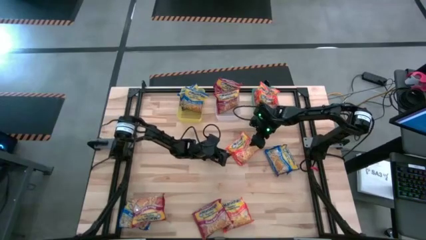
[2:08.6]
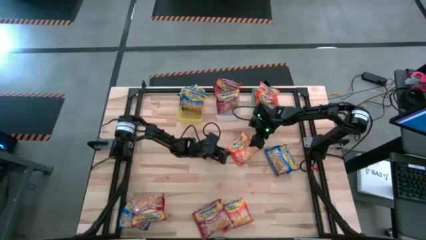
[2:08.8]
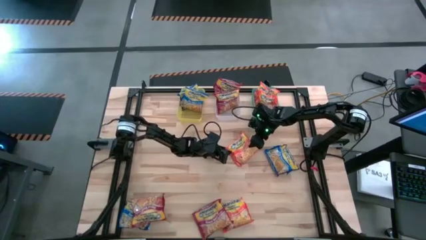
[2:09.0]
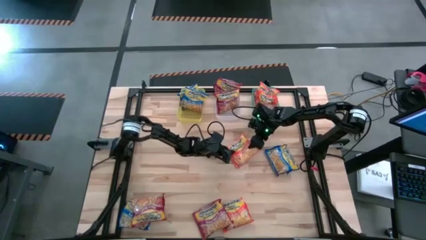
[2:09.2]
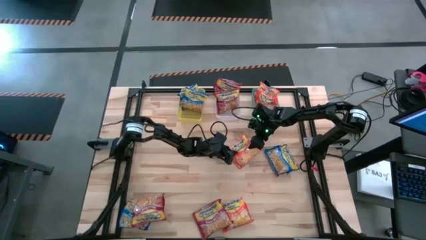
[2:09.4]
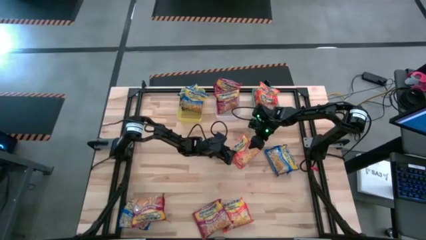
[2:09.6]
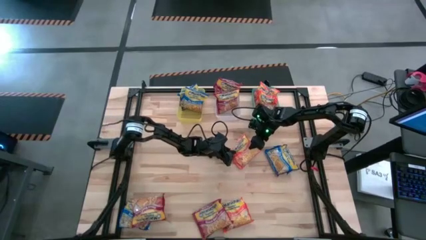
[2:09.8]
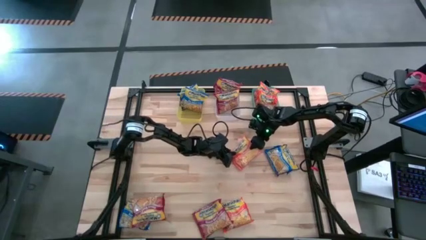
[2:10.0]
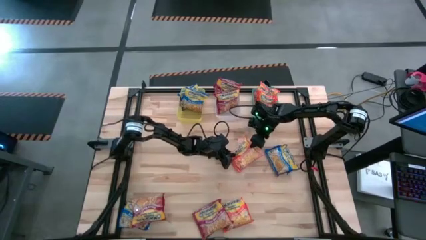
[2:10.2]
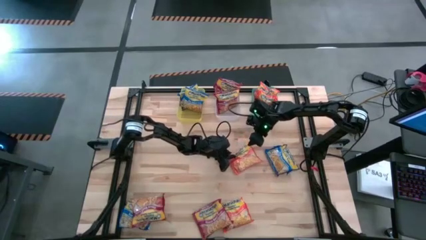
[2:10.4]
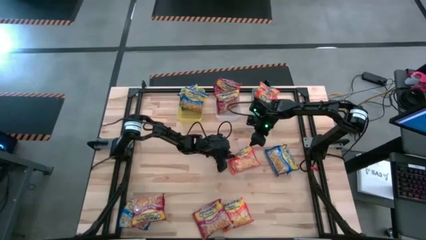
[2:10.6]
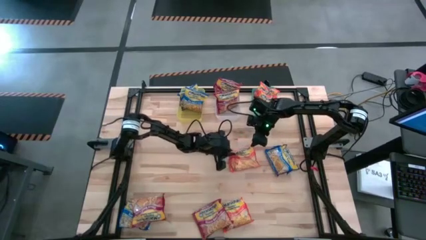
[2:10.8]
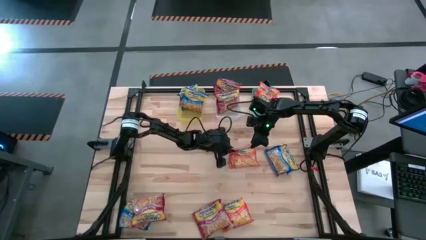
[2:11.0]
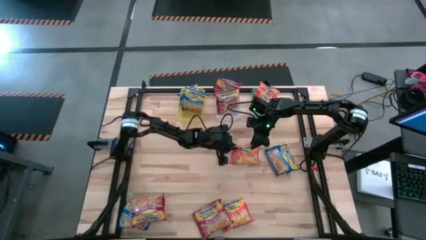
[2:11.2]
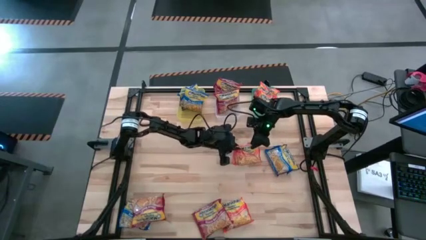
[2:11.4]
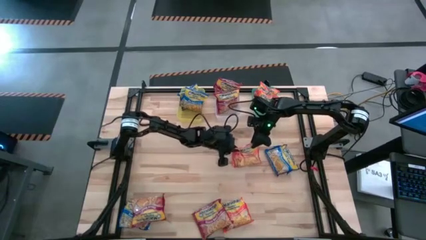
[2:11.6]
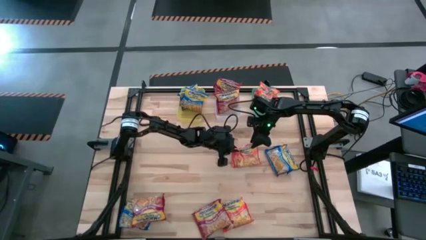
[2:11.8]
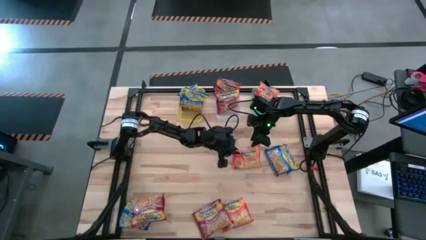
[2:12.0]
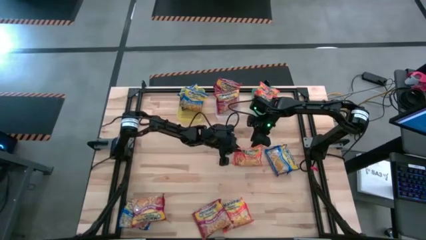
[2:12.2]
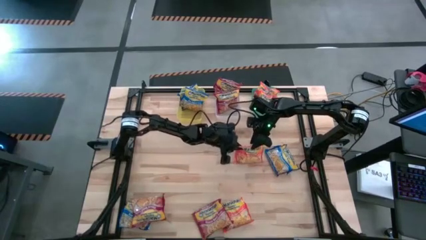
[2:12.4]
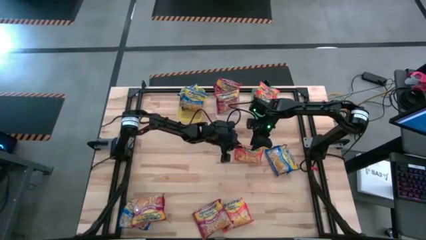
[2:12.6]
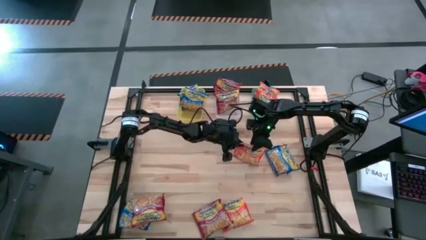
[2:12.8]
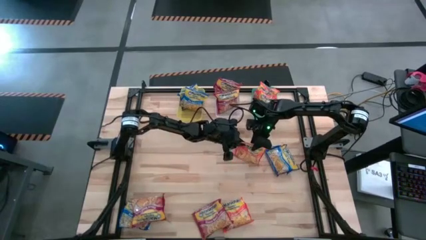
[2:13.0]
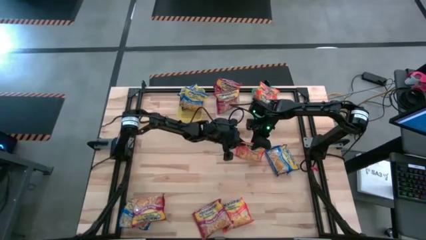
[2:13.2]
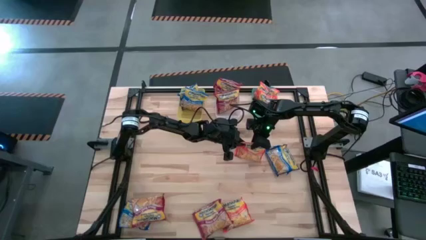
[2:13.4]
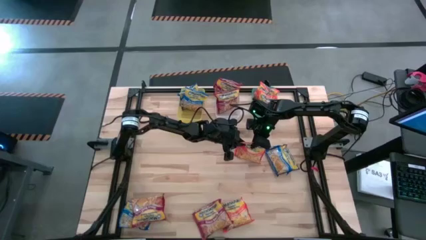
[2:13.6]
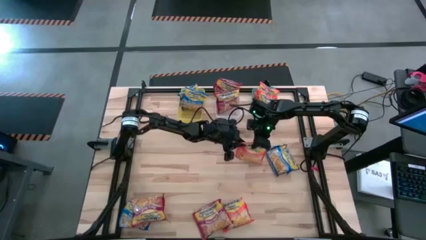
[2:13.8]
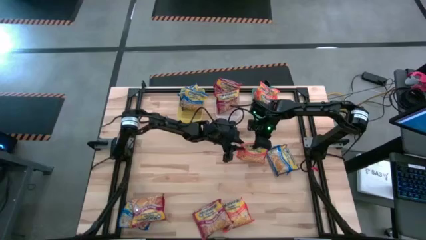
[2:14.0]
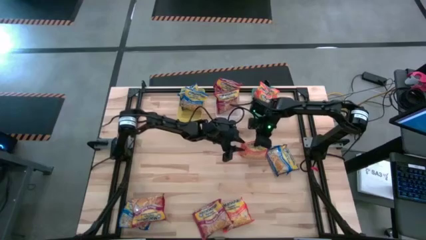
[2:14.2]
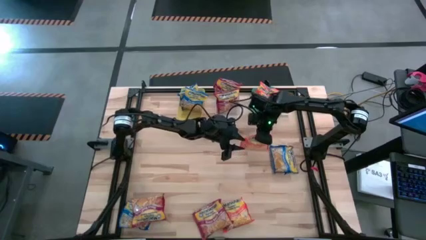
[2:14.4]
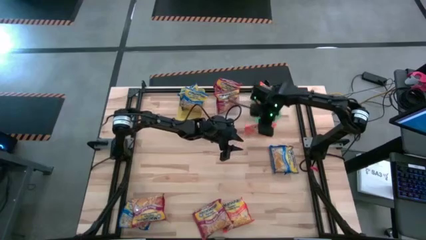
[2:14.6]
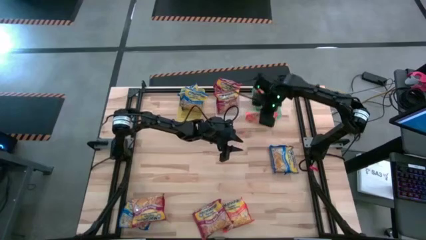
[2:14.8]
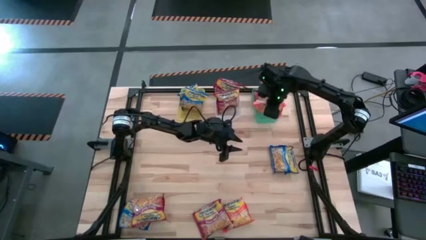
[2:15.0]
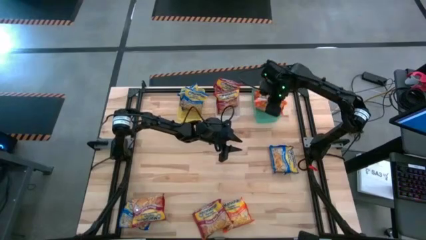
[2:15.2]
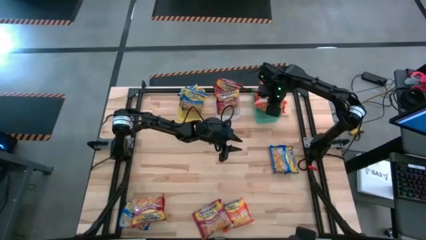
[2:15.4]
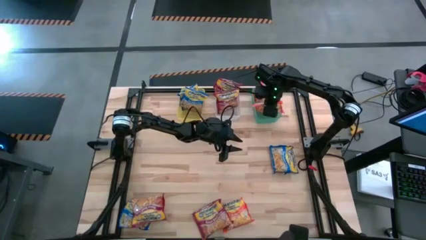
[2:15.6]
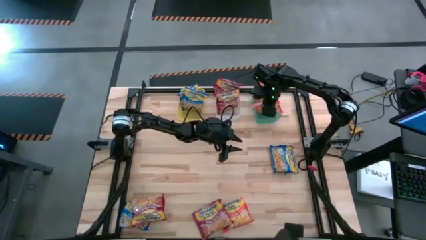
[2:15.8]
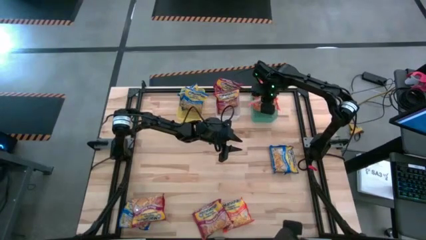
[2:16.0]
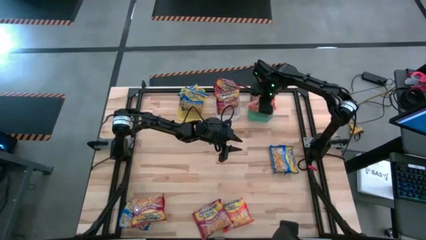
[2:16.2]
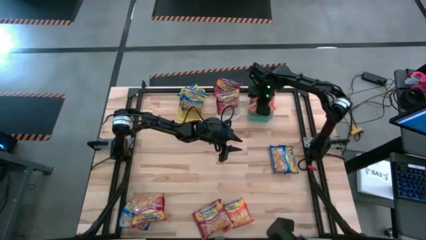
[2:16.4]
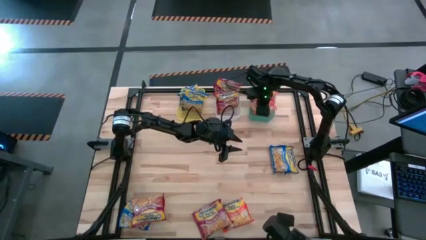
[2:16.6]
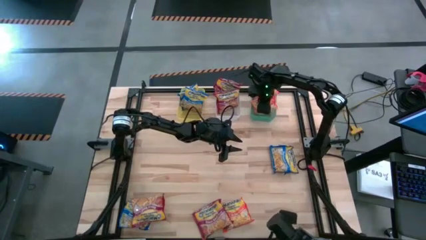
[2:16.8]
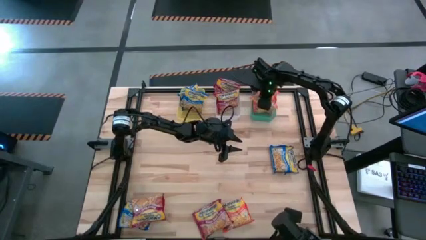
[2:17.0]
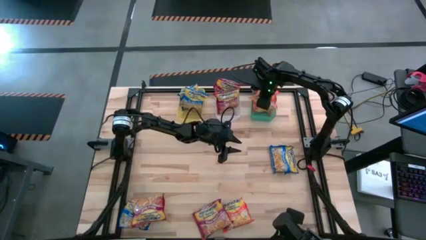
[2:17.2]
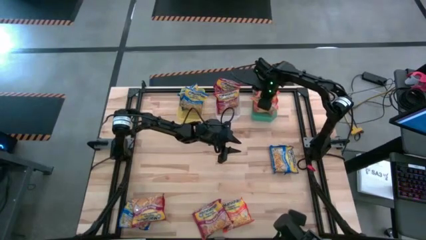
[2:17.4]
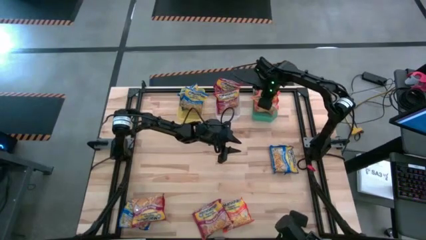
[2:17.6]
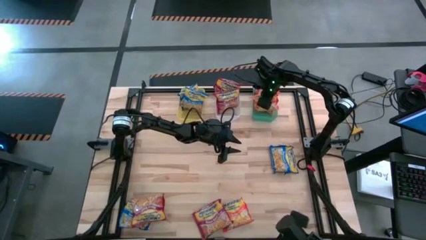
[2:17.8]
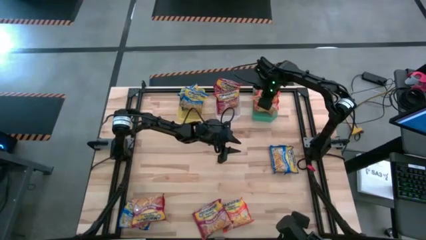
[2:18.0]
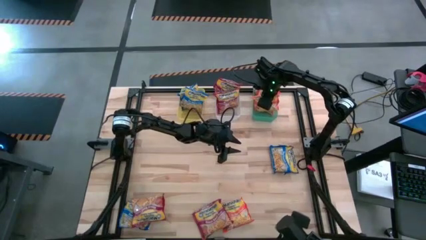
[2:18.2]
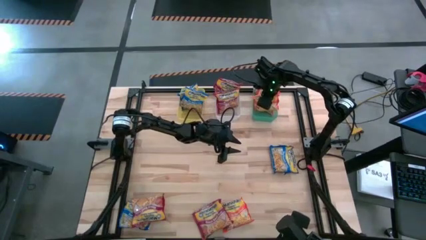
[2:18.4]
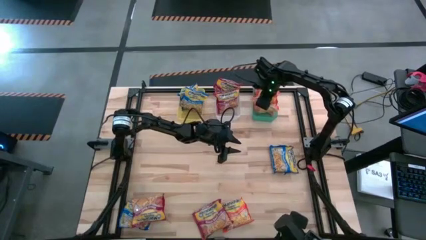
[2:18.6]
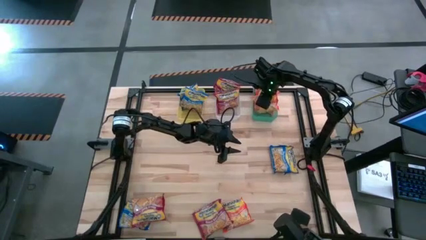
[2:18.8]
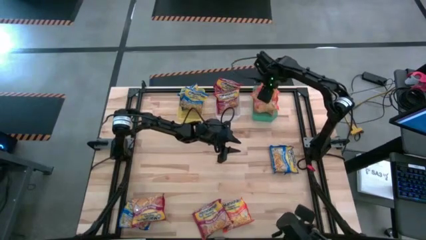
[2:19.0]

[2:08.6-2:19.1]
Task: Sort Maruchan noodles
Put the right orange noodle pack into the green bin

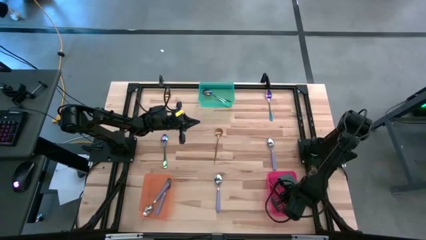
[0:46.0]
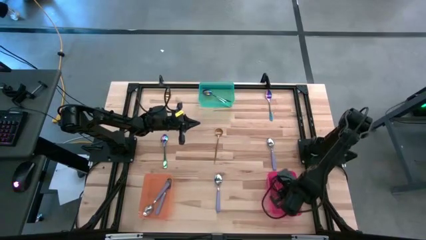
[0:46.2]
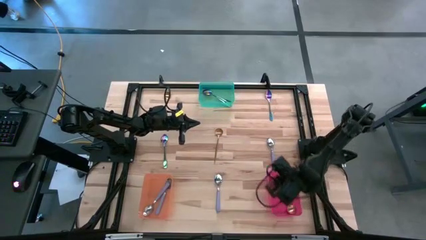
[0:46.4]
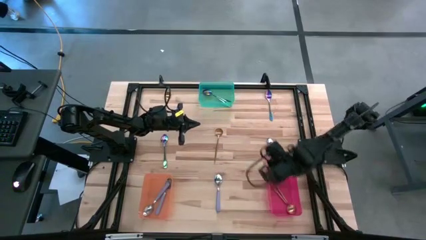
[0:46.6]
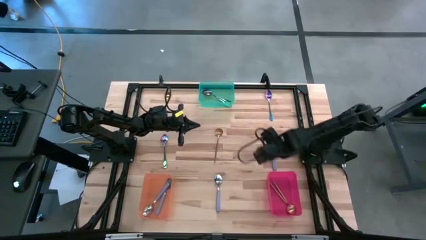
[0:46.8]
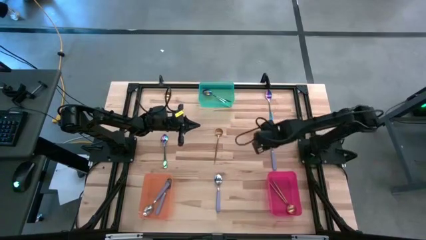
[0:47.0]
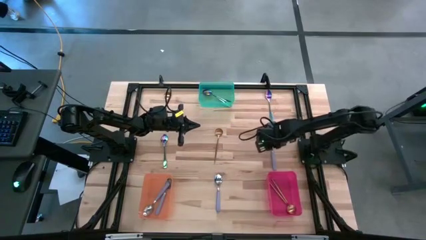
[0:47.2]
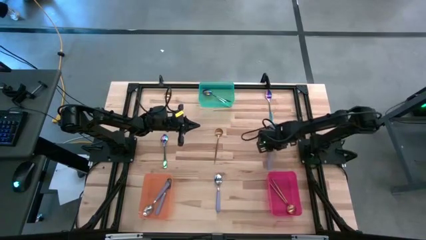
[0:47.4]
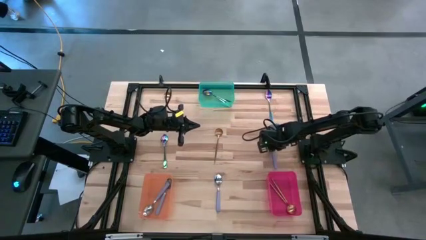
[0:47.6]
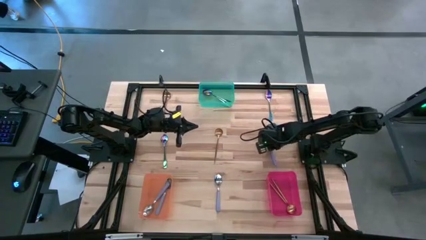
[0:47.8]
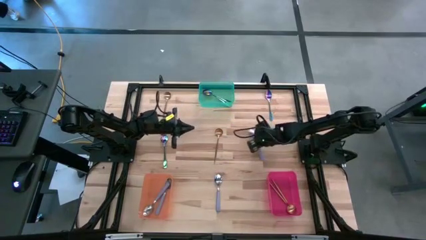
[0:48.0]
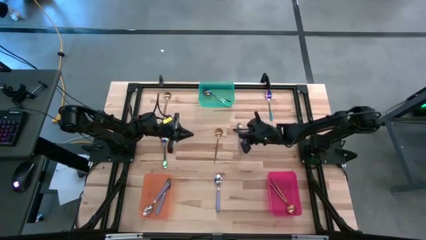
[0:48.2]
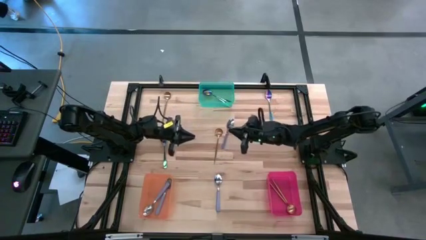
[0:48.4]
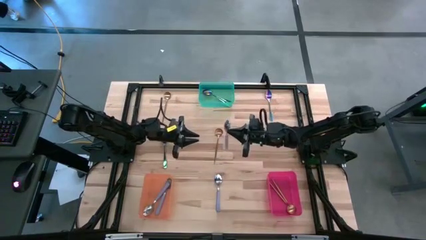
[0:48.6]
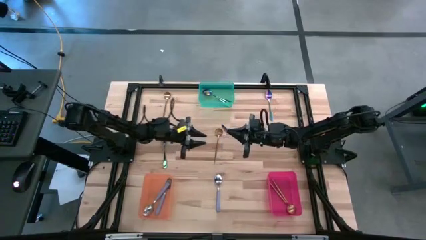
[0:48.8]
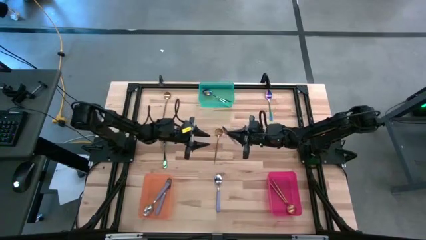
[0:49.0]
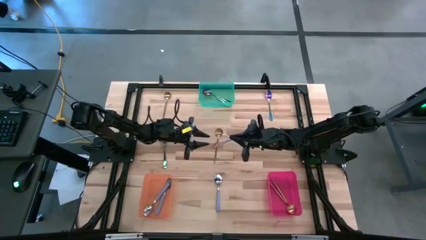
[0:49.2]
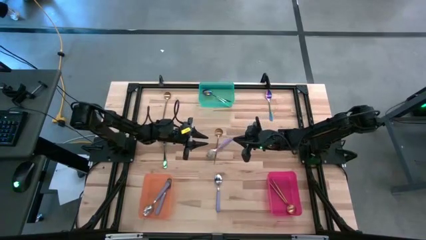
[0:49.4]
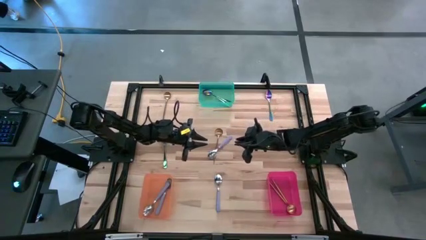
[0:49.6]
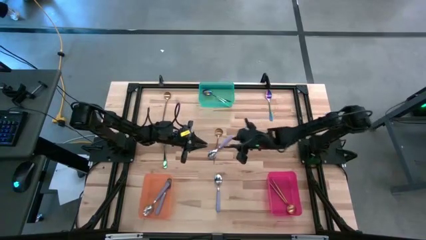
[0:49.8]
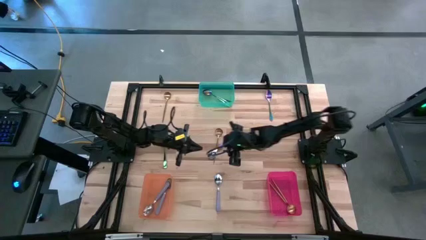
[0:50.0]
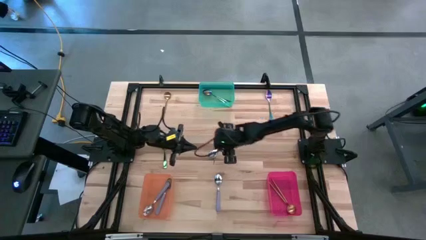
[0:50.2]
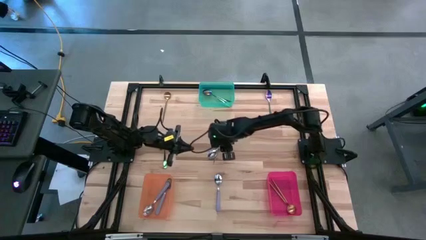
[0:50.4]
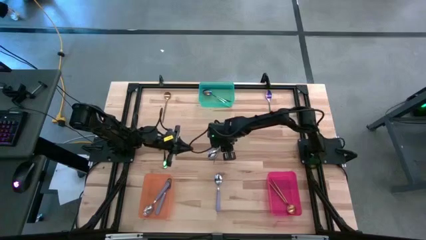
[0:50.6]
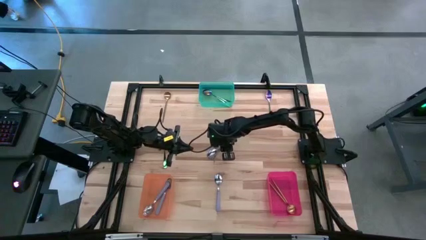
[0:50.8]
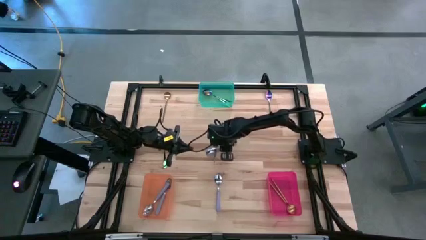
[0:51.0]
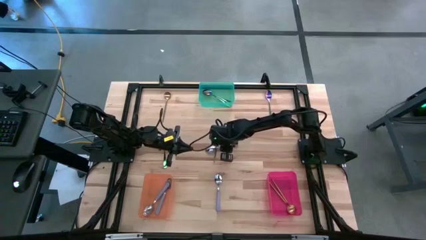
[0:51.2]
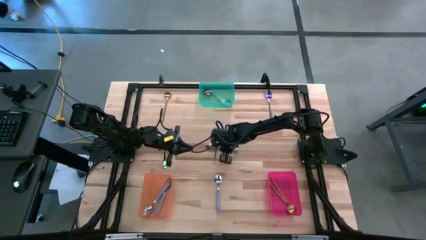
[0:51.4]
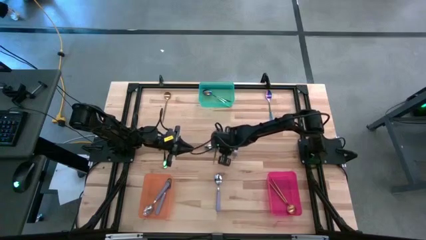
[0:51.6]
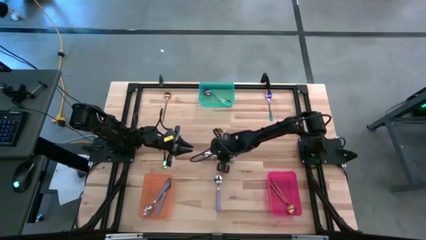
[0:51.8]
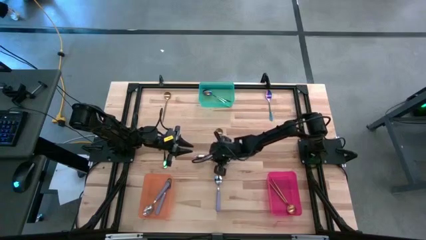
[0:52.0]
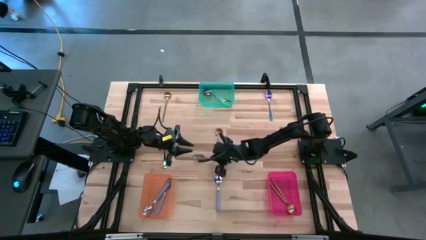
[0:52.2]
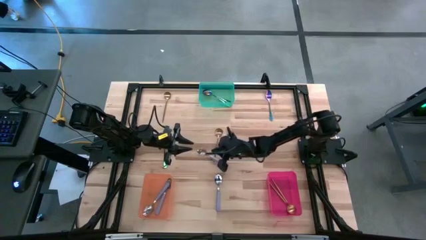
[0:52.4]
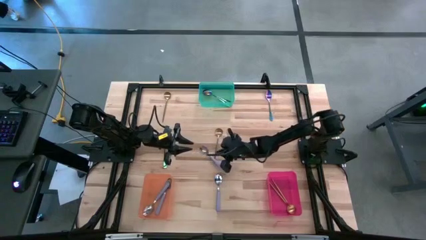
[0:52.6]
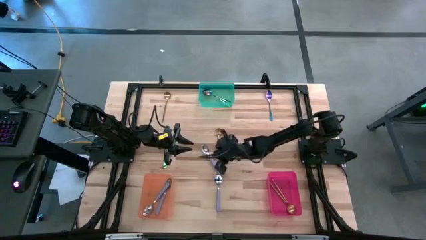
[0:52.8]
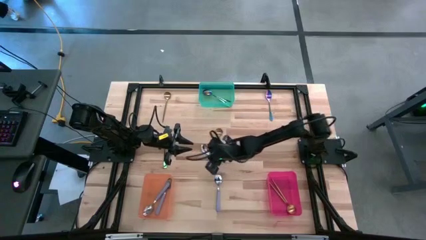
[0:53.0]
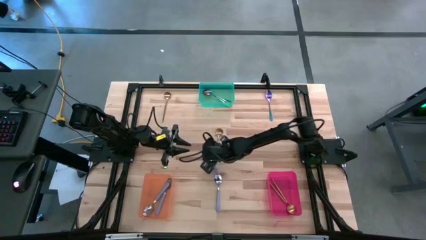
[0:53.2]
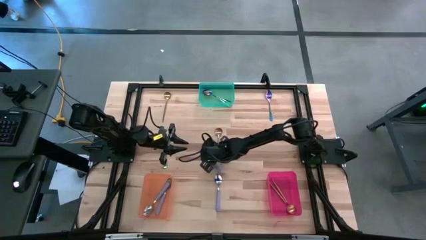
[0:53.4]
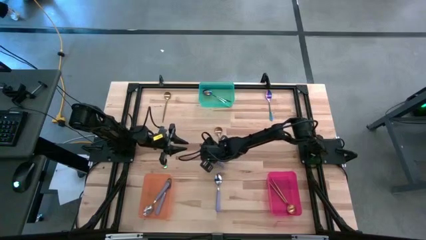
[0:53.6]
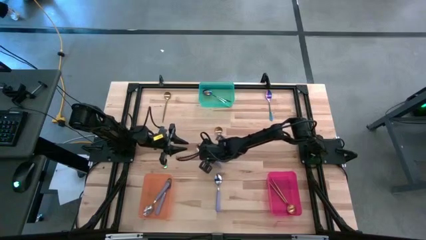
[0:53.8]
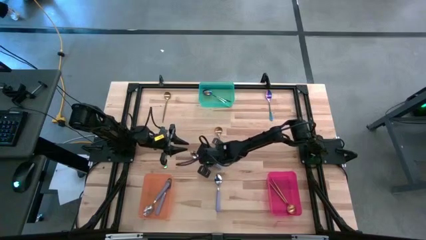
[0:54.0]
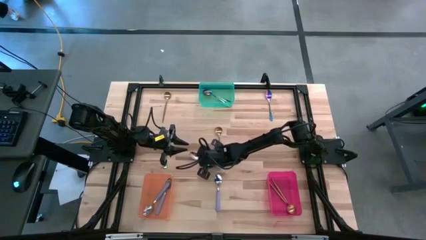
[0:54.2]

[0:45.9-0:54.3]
Task: Sort silverware by color (type)
Put the purple spoon into the orange bin
